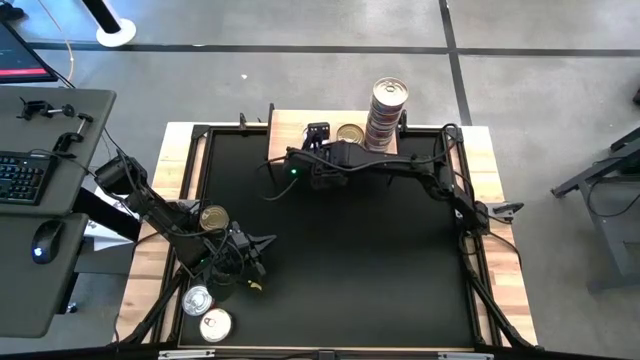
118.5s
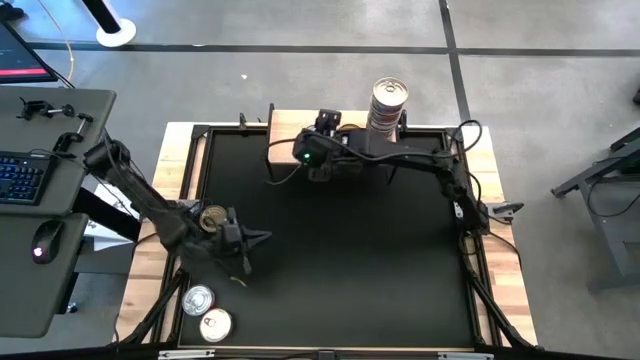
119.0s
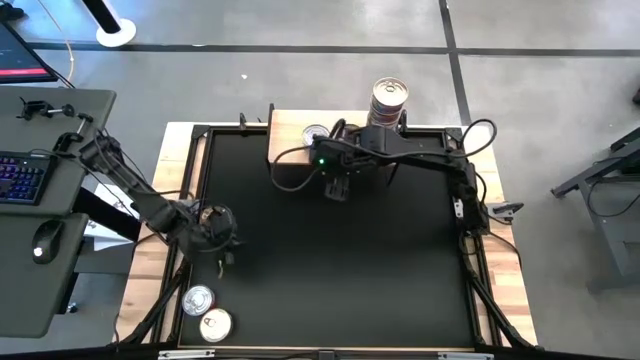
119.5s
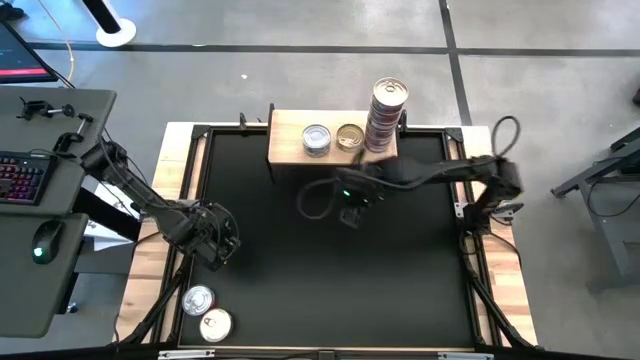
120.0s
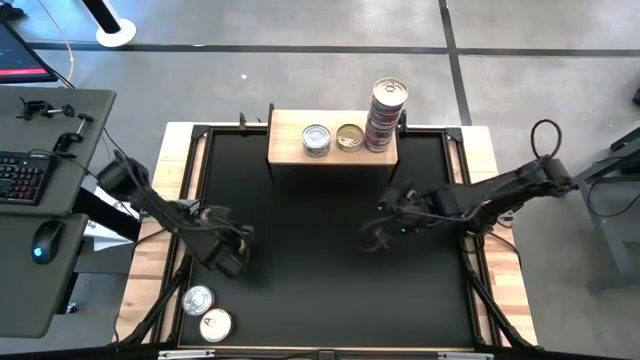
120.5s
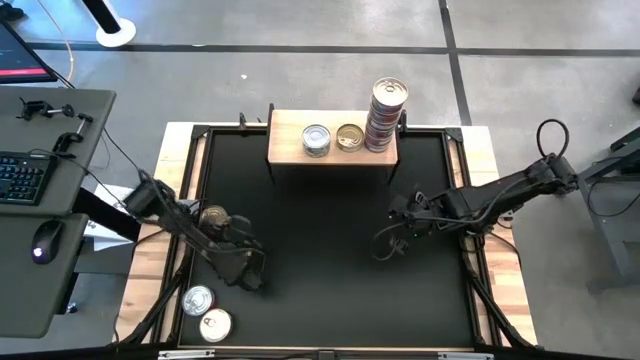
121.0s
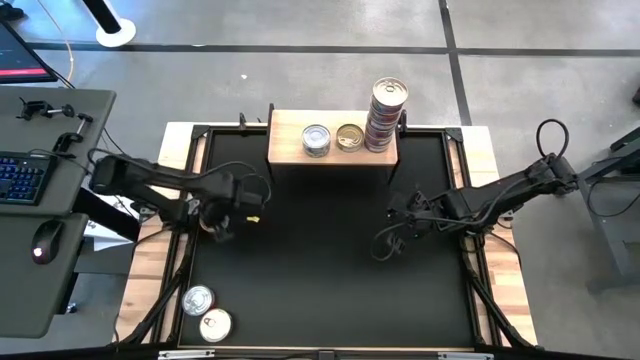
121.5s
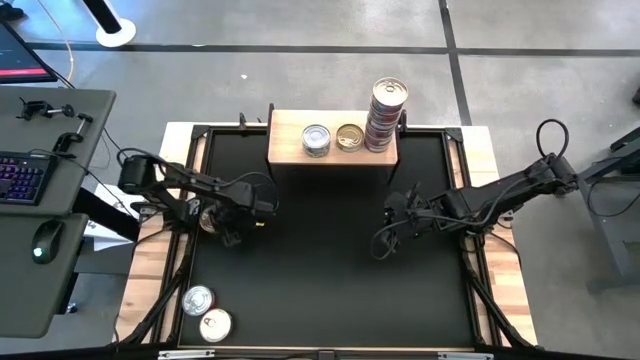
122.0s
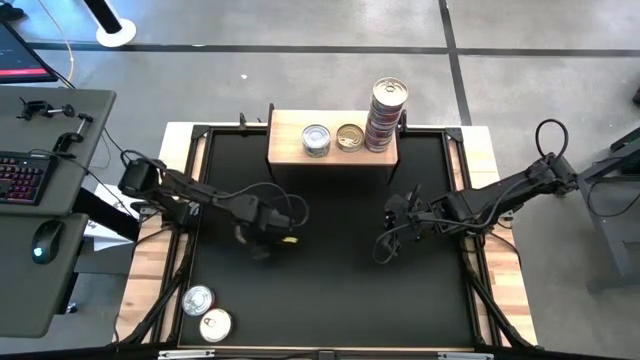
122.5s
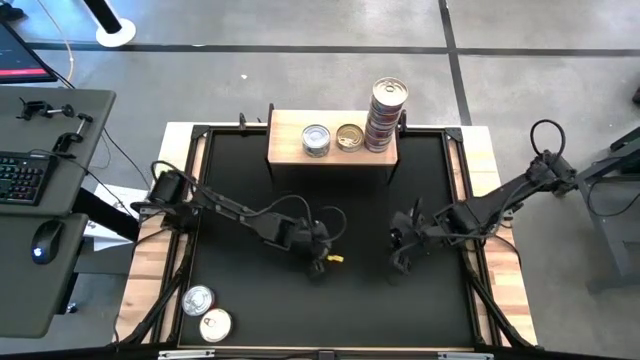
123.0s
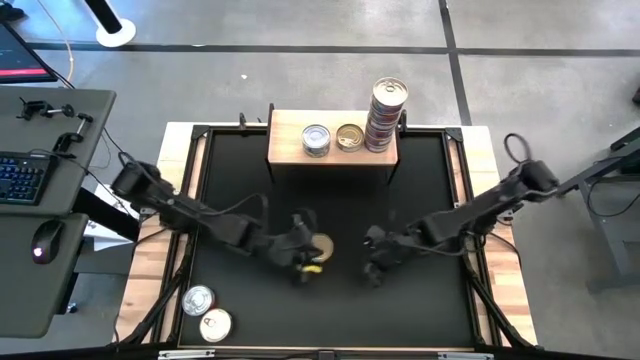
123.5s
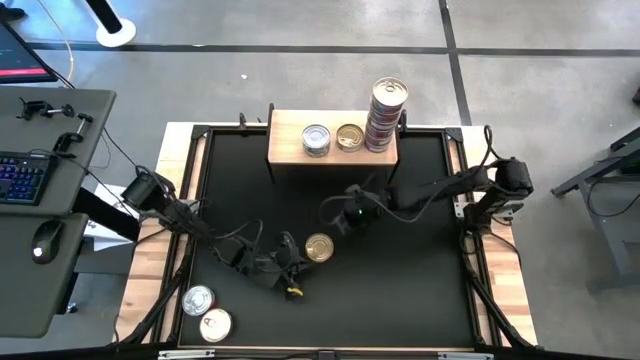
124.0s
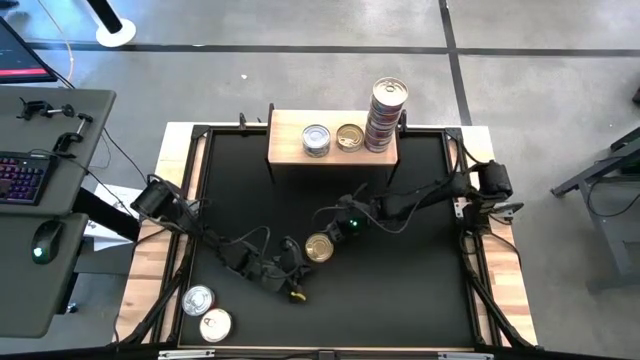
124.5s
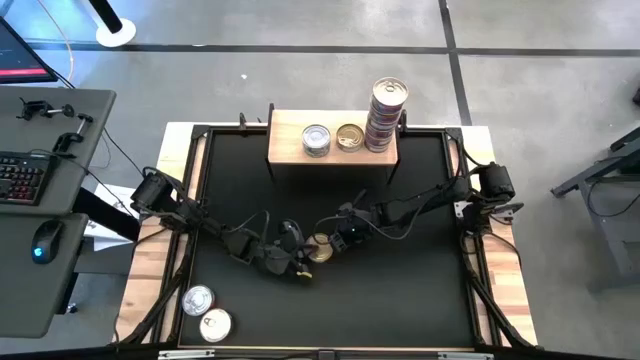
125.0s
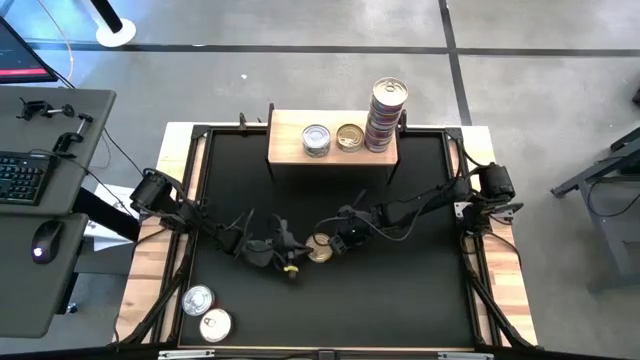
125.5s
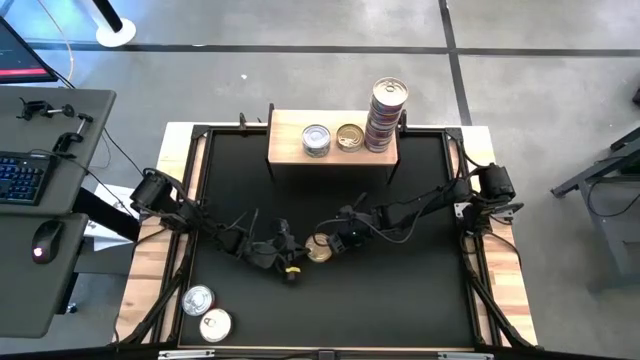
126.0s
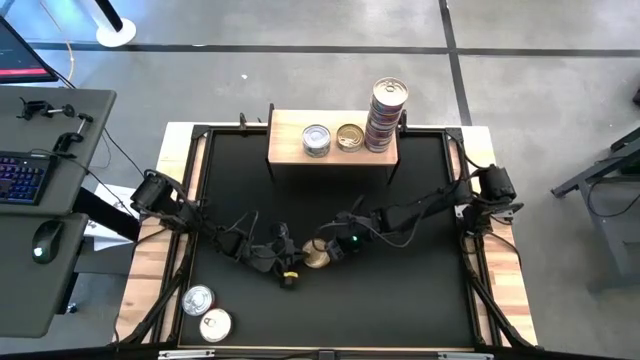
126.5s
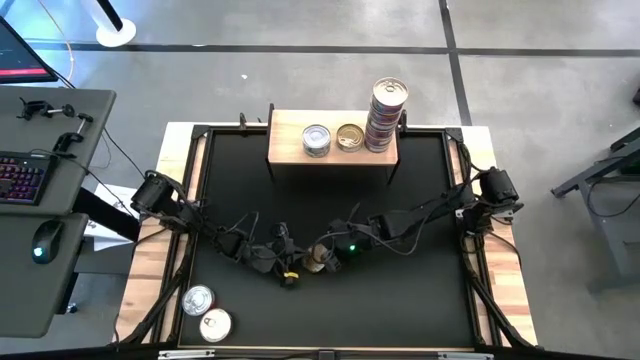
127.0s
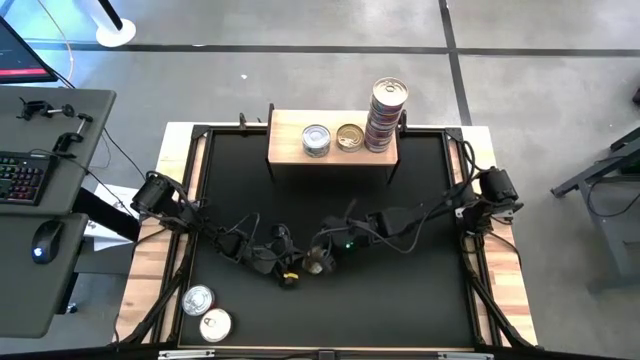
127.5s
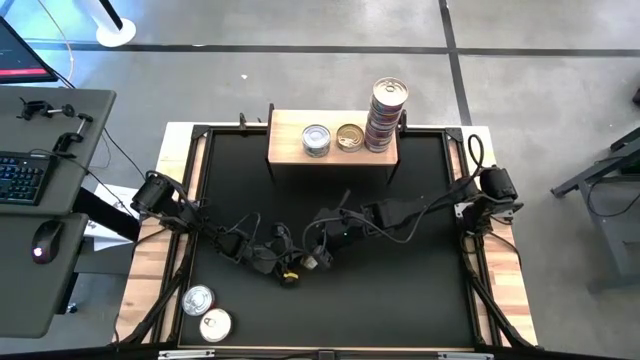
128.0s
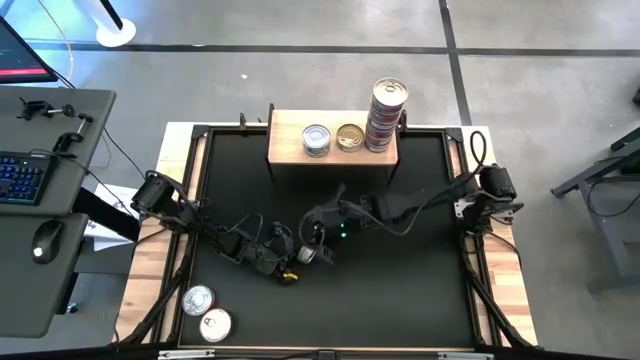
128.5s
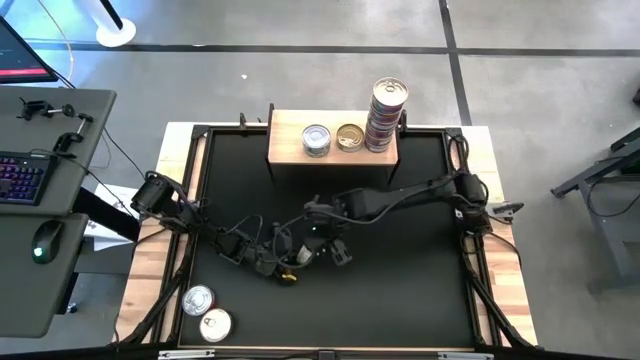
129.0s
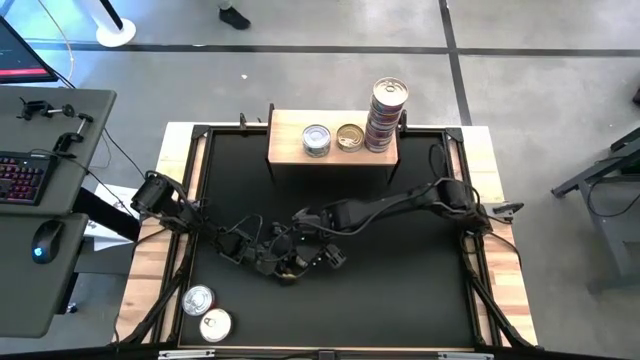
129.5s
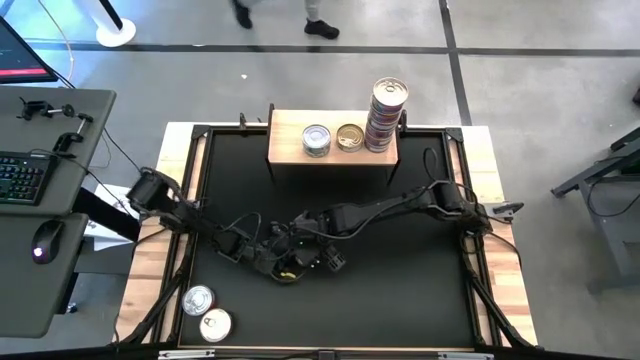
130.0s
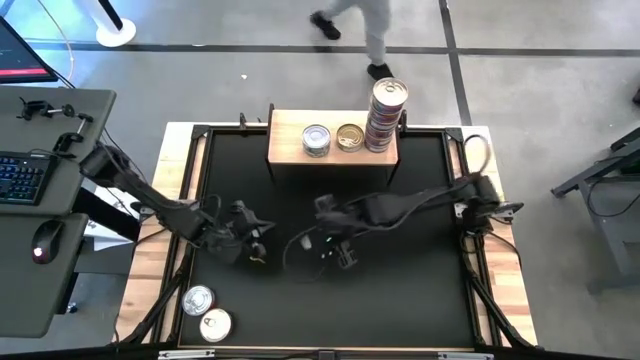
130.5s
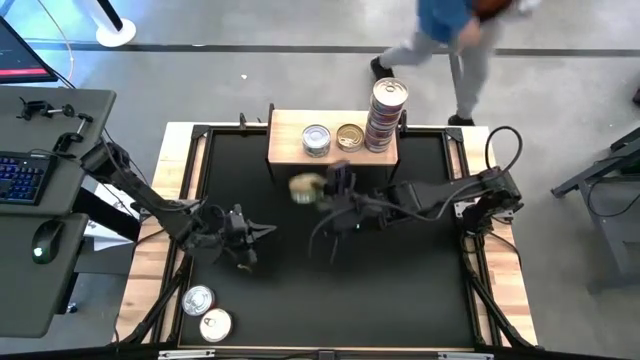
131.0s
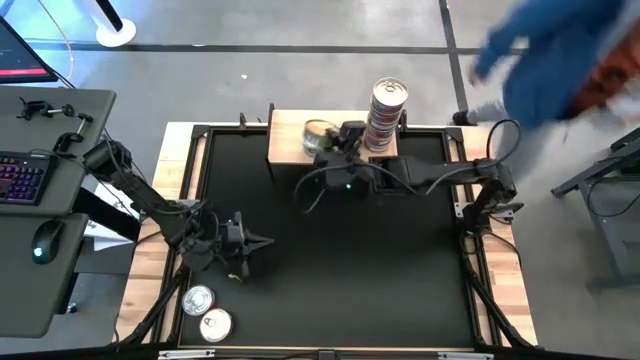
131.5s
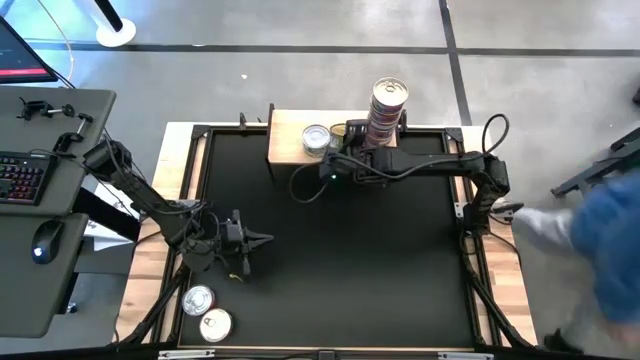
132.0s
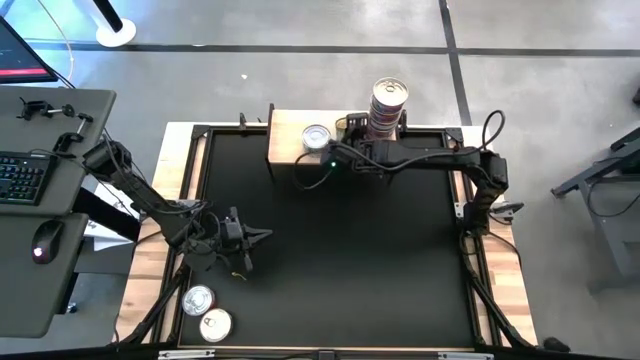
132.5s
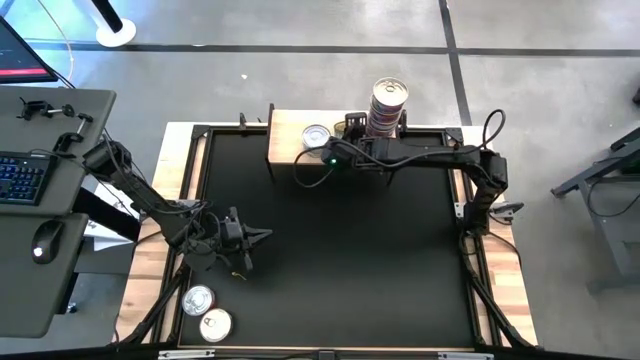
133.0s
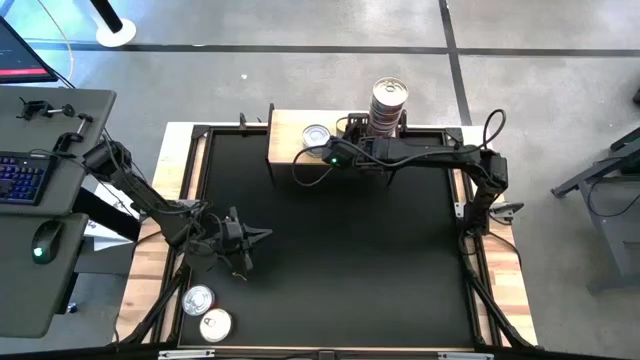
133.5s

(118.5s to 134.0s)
Task: Stack canned seafood by type on shelf
Stack the green tuna can on top of the green tuna can

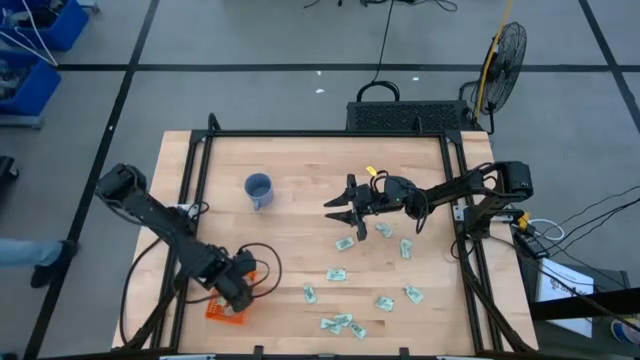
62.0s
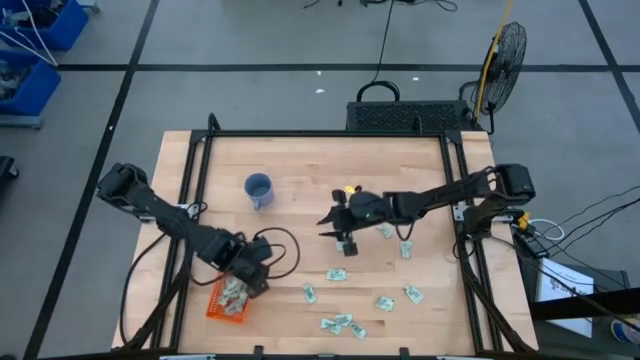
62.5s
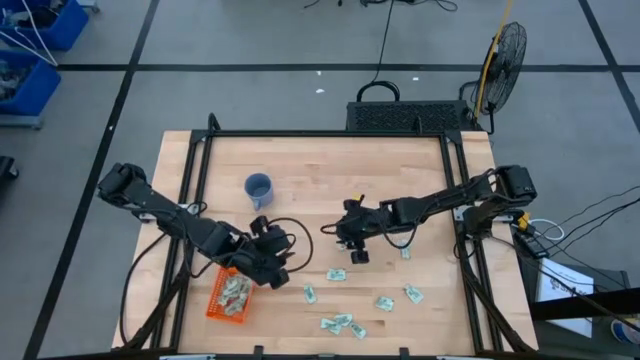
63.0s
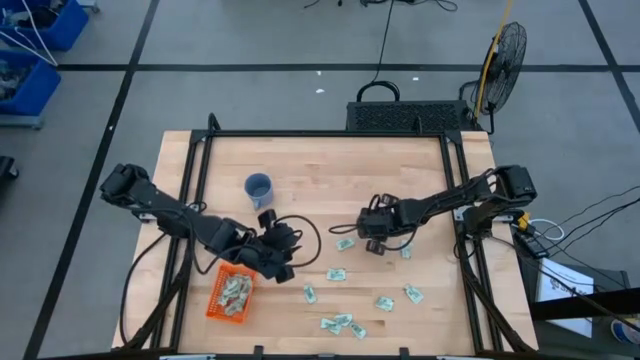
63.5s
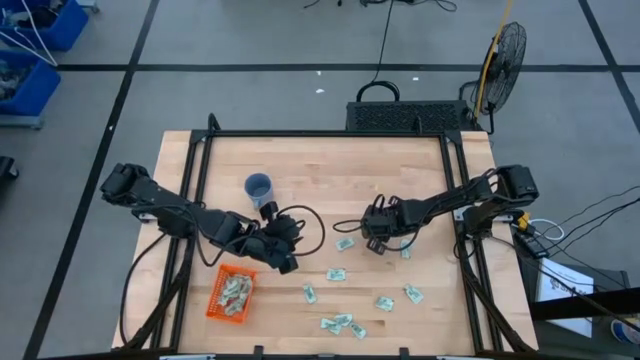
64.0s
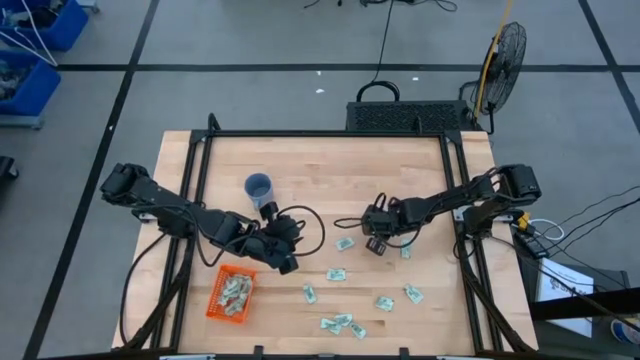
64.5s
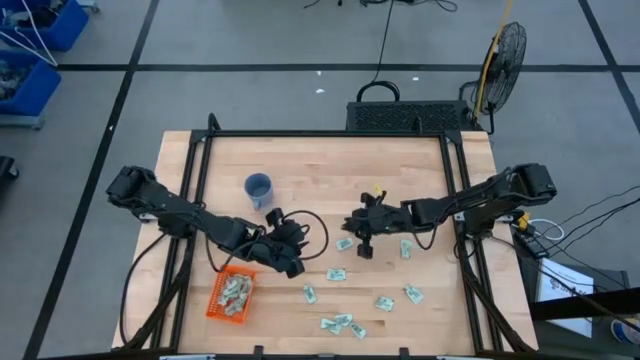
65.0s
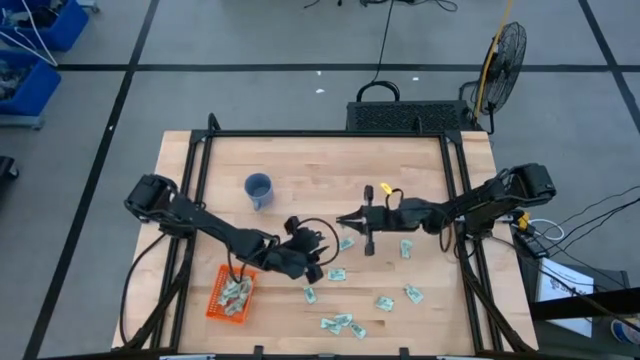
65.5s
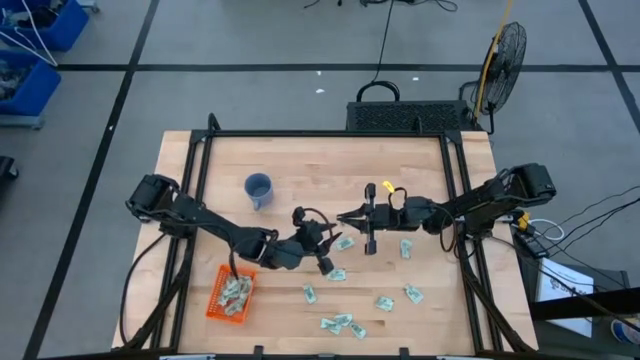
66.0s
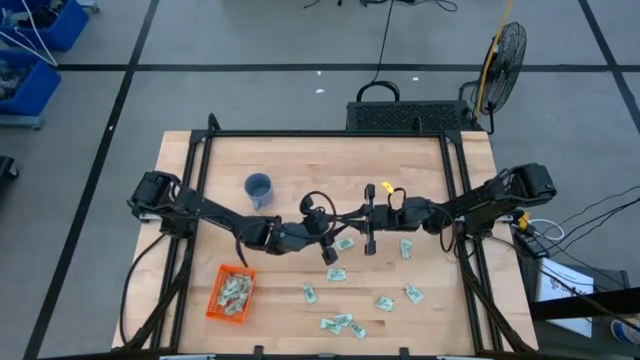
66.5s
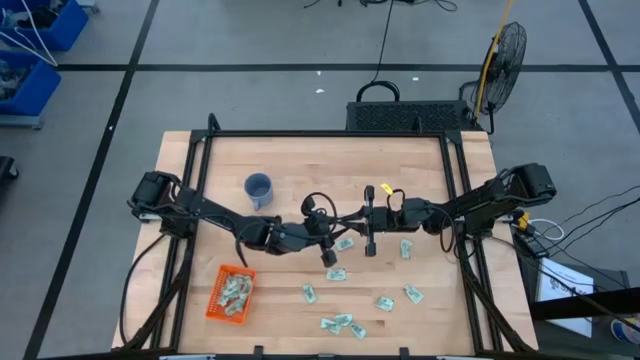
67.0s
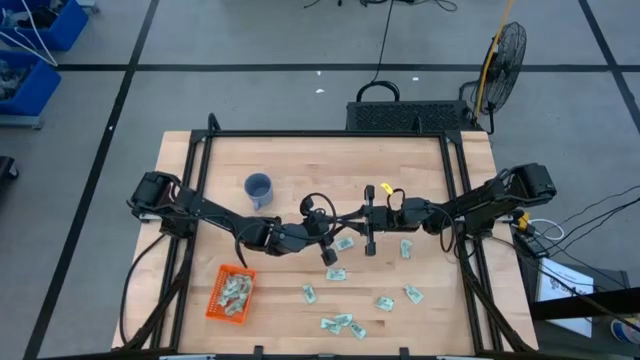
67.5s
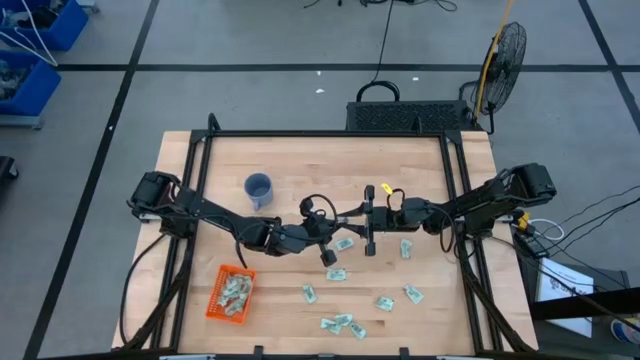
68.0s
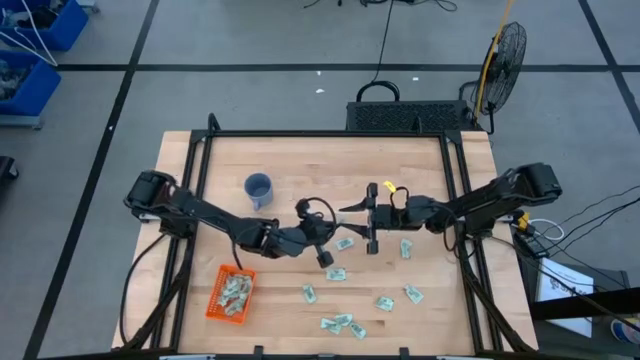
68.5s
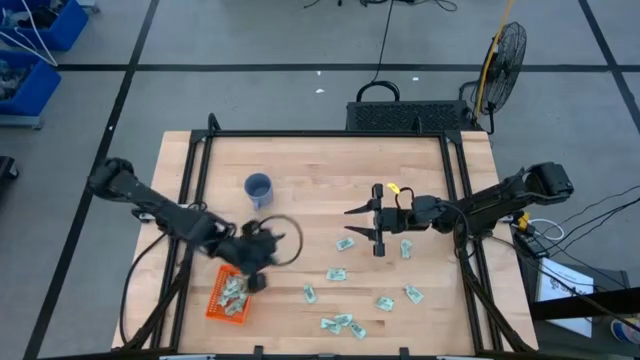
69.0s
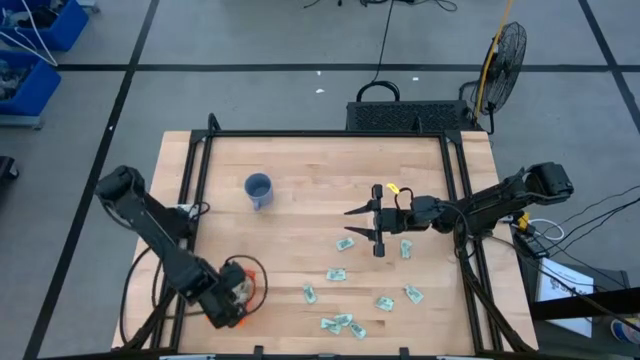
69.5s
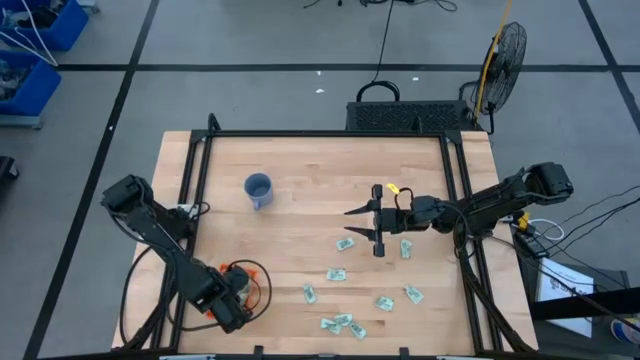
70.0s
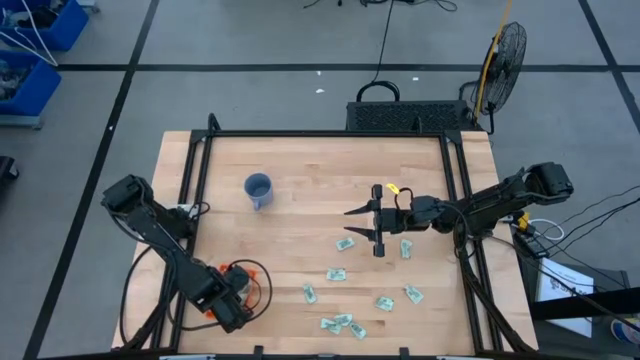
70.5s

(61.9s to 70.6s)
Task: Pick and place Stevia / Truvia into bins
Put the stevia packet into the orange bin
